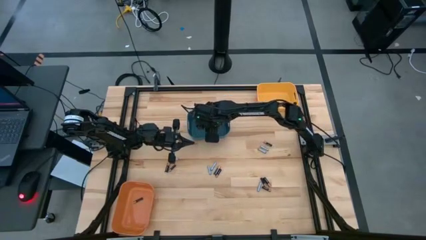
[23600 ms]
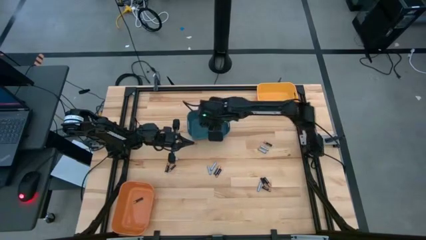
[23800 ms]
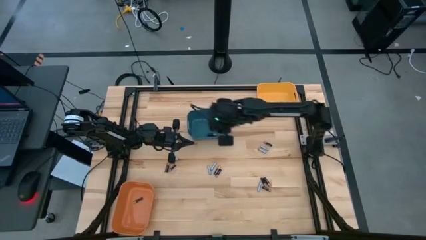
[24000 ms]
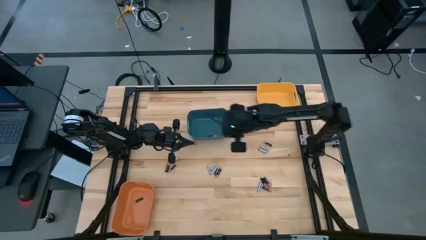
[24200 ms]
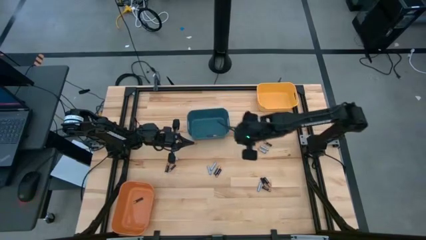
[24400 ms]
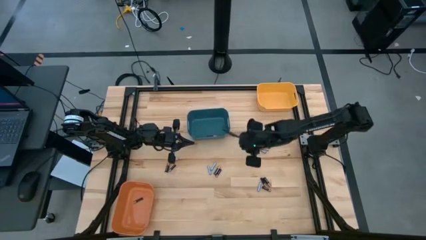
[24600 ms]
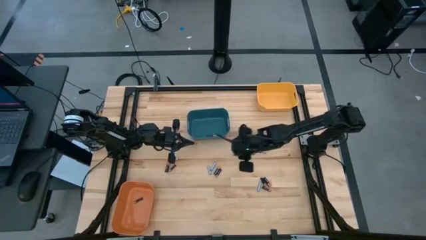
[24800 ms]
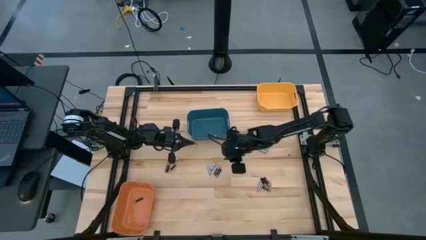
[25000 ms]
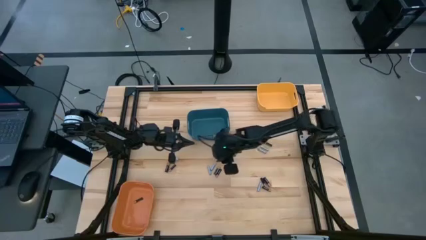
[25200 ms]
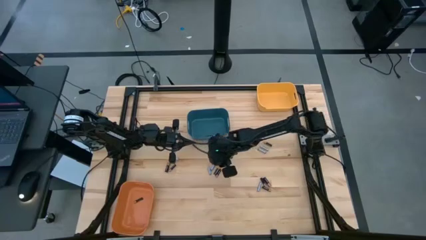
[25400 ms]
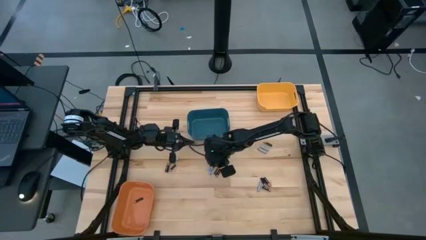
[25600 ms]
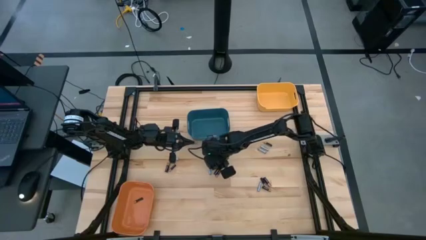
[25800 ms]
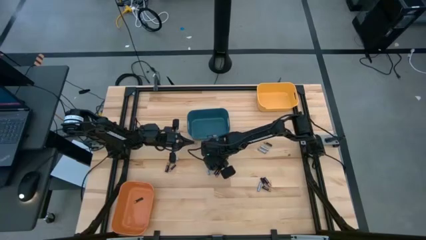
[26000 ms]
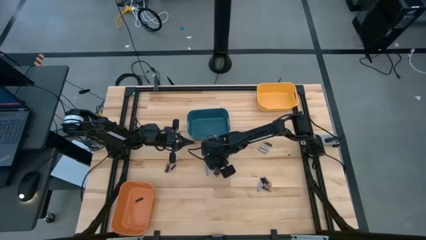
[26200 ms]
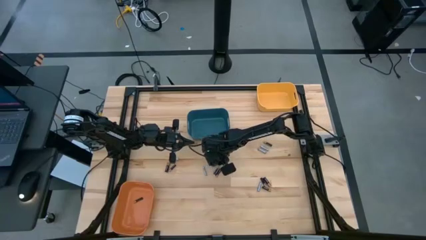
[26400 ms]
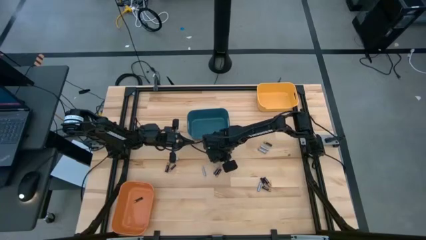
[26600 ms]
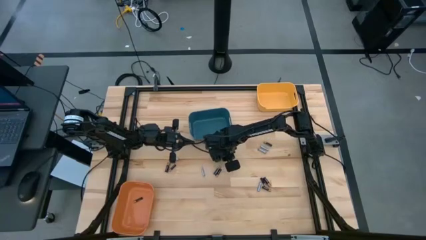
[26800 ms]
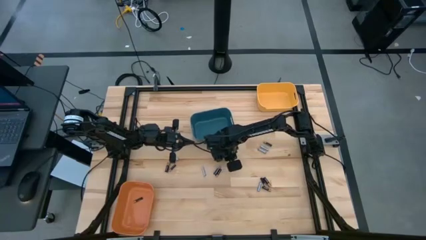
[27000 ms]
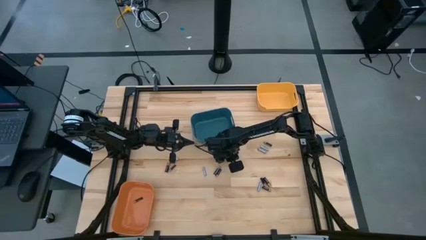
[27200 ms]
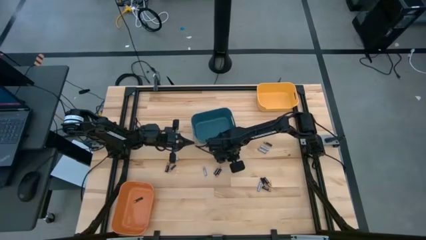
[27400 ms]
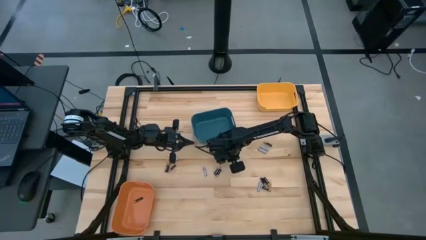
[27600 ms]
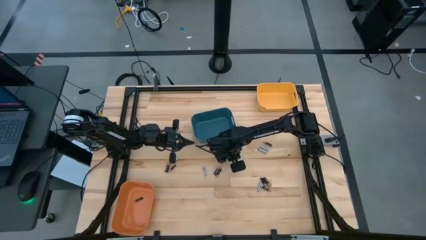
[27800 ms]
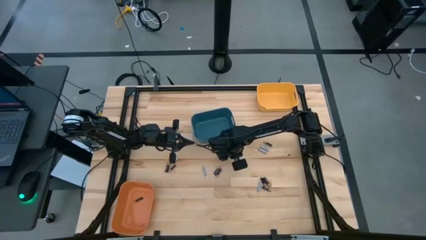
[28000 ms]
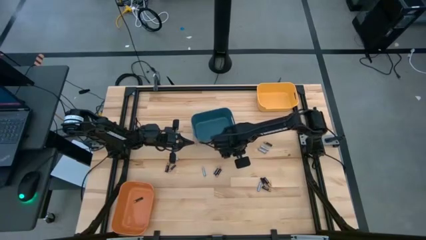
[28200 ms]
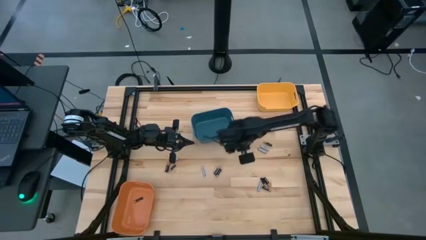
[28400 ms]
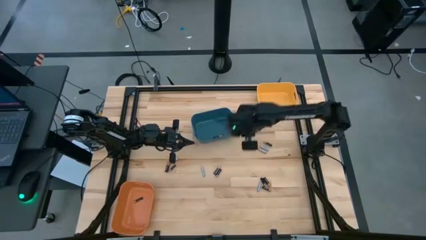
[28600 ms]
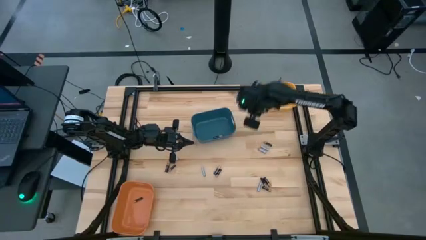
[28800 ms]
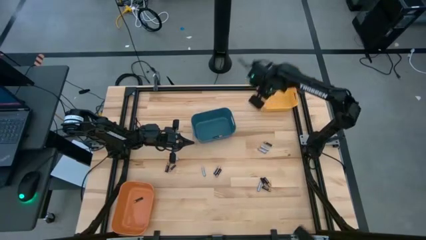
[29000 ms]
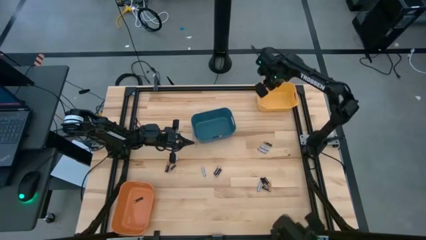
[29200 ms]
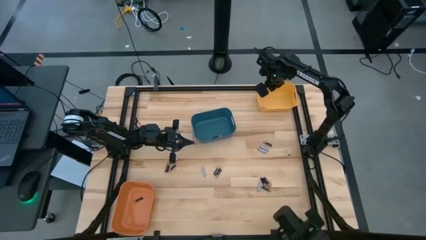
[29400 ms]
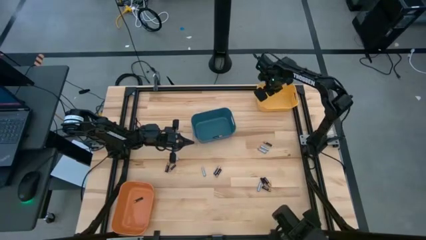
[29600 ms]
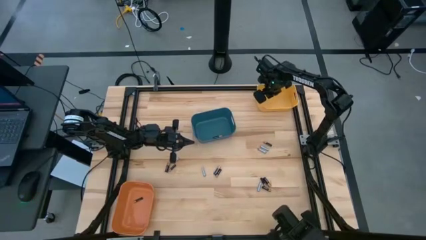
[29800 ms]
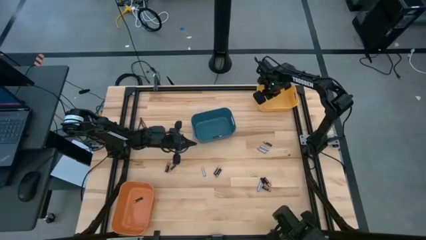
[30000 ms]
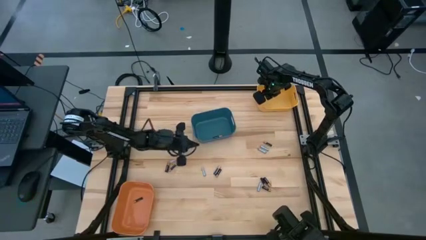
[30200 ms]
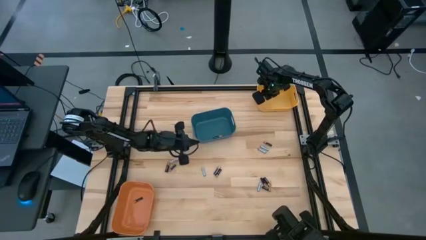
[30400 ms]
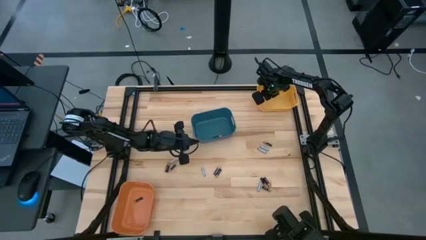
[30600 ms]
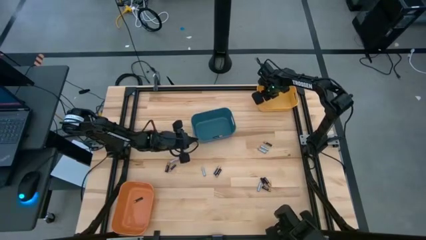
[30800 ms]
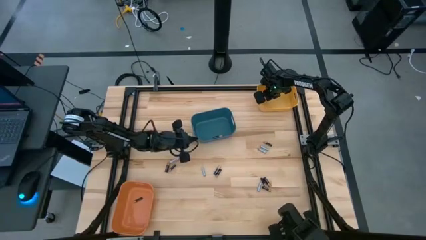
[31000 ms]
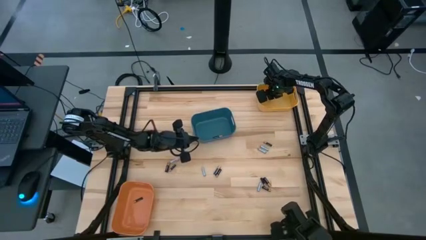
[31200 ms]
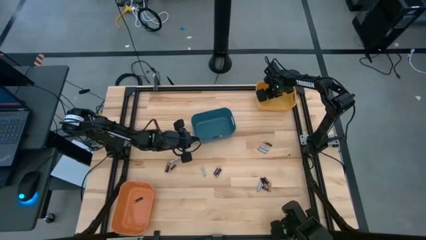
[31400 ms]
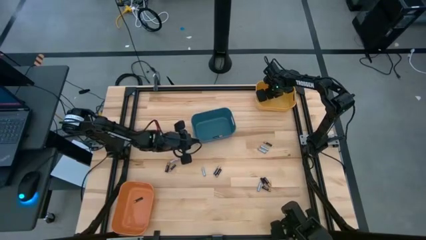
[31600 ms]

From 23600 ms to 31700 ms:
Task: Sort batteries
Put the white battery into the yellow bin

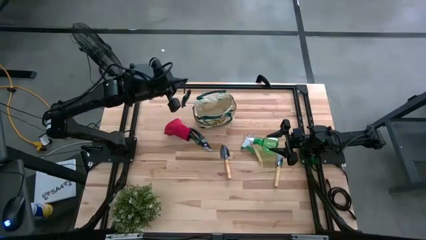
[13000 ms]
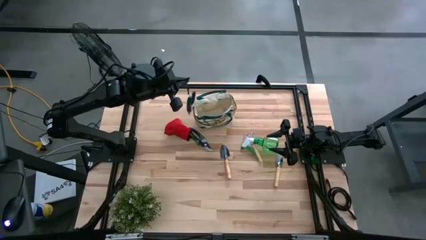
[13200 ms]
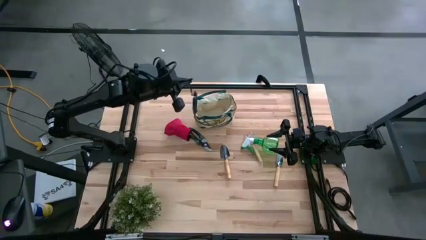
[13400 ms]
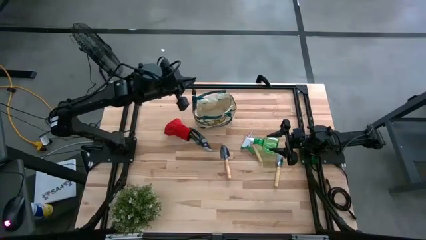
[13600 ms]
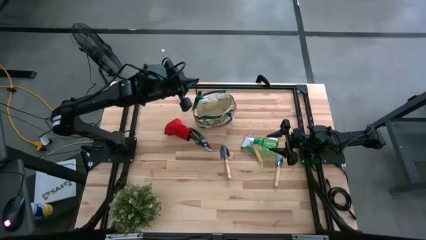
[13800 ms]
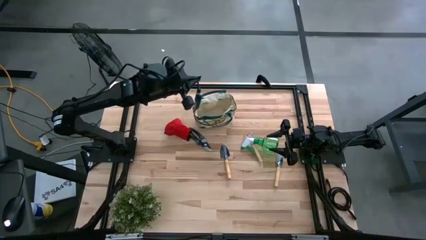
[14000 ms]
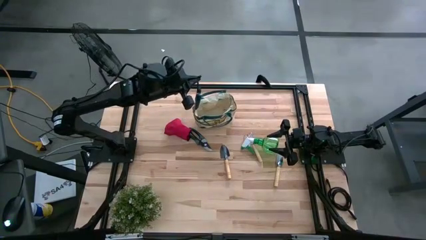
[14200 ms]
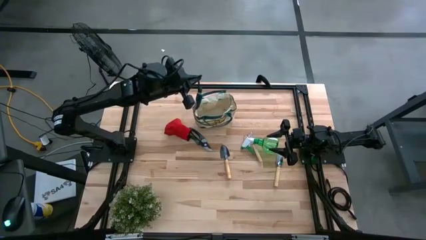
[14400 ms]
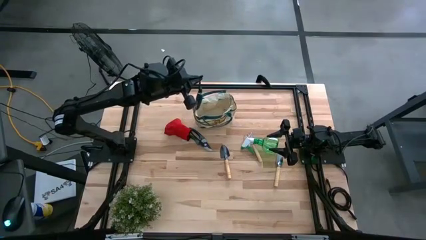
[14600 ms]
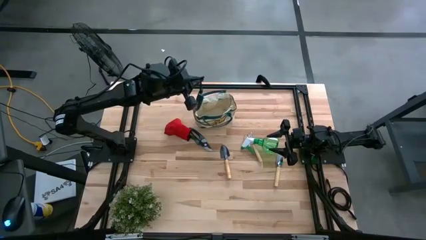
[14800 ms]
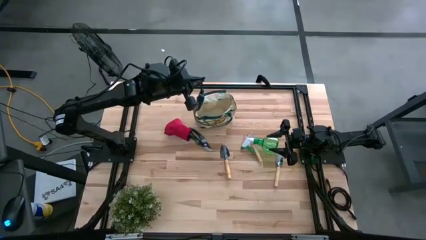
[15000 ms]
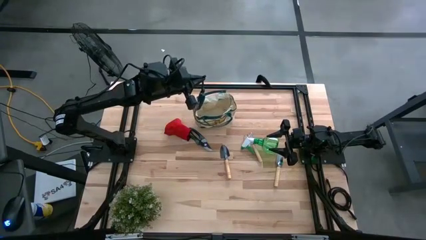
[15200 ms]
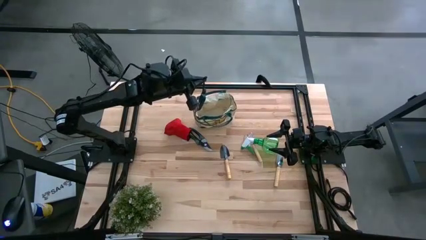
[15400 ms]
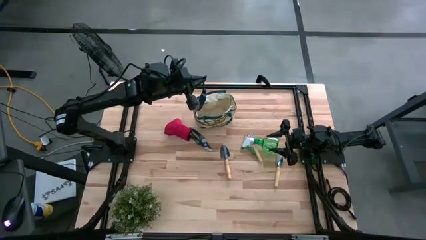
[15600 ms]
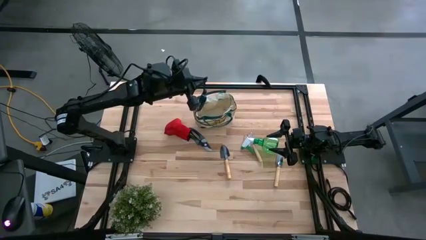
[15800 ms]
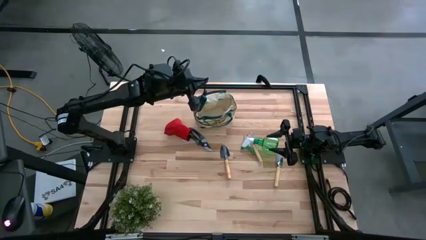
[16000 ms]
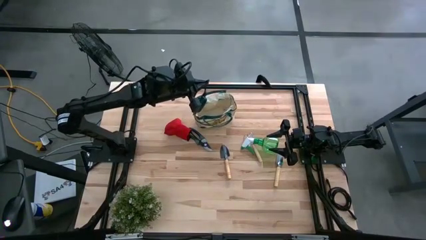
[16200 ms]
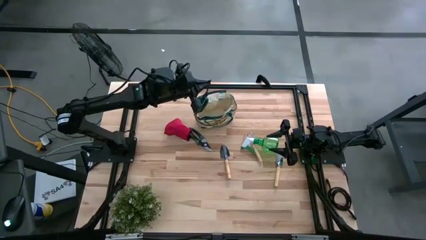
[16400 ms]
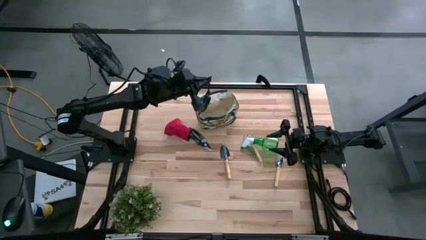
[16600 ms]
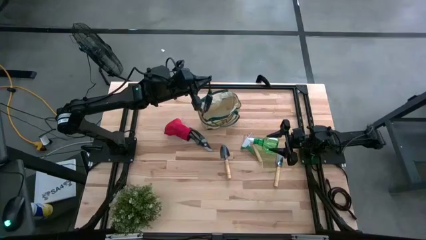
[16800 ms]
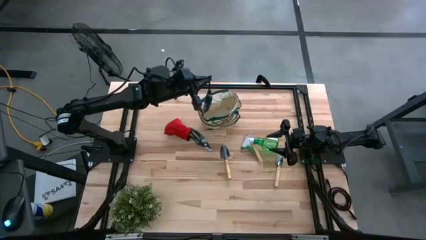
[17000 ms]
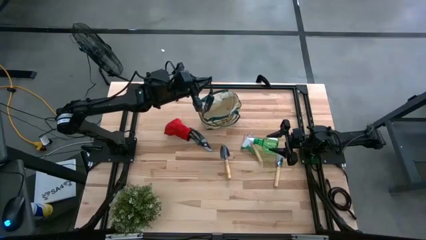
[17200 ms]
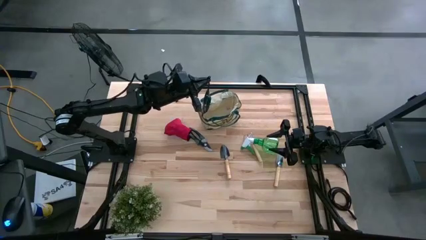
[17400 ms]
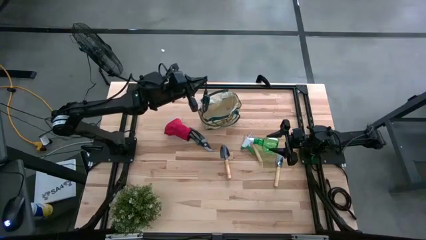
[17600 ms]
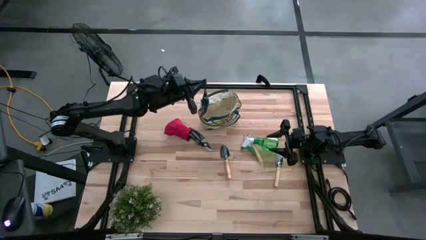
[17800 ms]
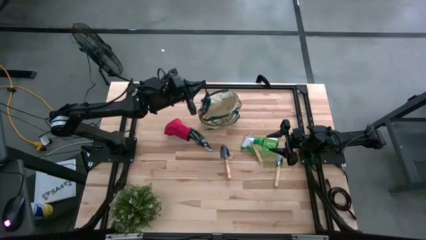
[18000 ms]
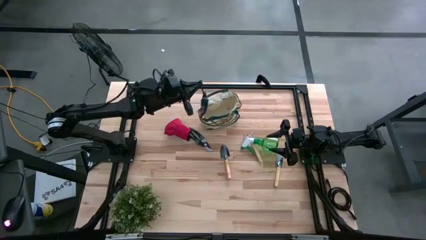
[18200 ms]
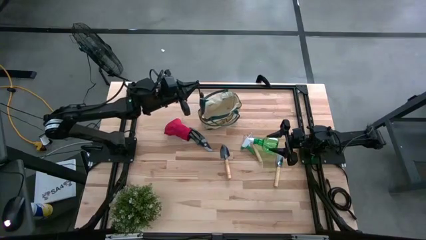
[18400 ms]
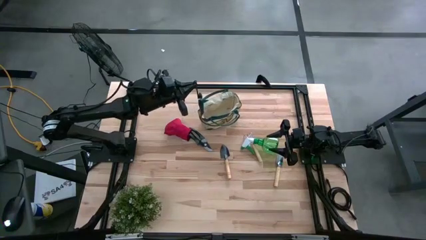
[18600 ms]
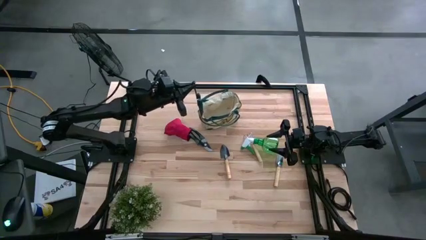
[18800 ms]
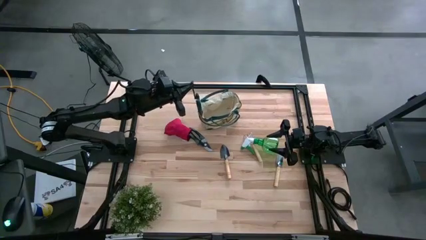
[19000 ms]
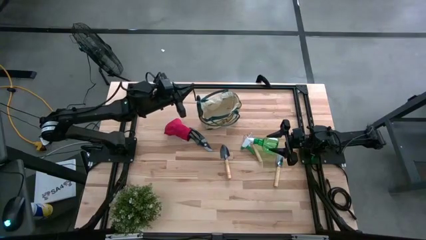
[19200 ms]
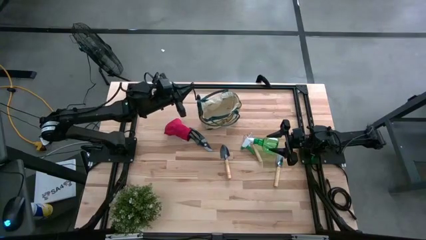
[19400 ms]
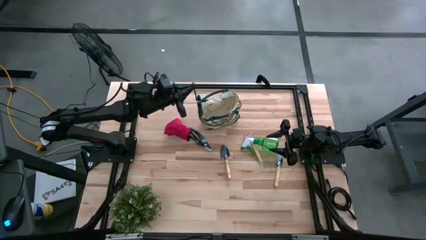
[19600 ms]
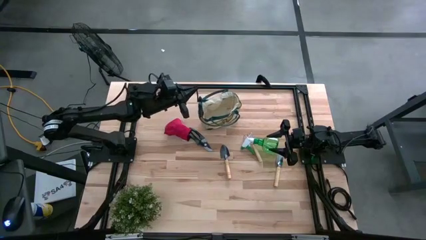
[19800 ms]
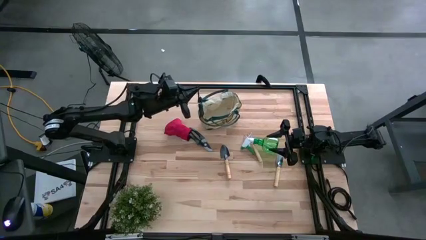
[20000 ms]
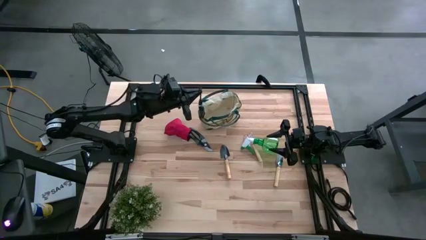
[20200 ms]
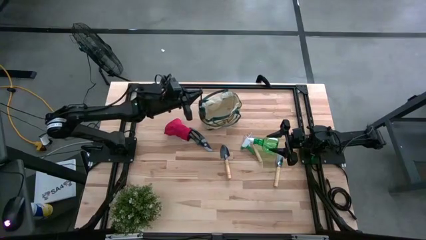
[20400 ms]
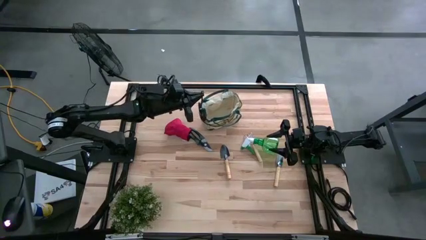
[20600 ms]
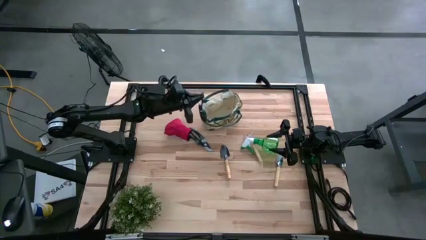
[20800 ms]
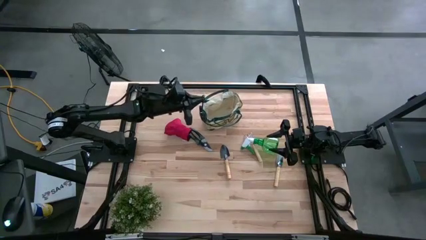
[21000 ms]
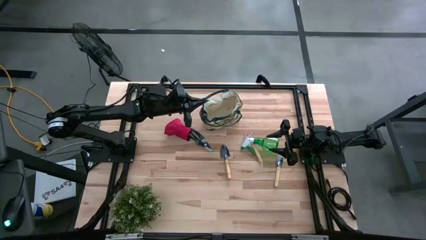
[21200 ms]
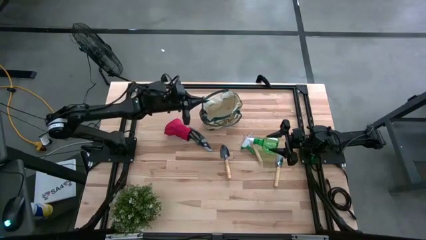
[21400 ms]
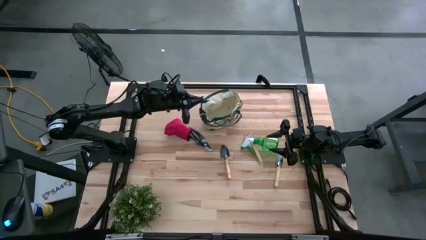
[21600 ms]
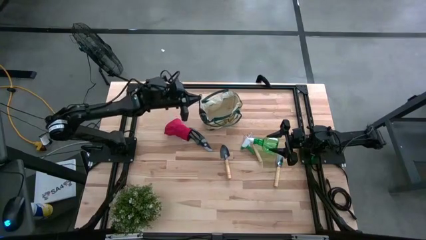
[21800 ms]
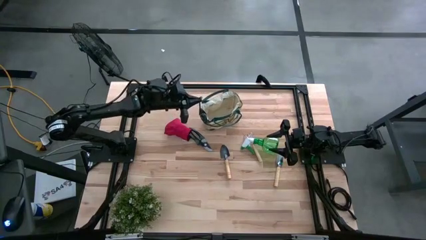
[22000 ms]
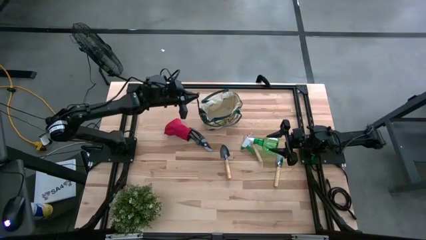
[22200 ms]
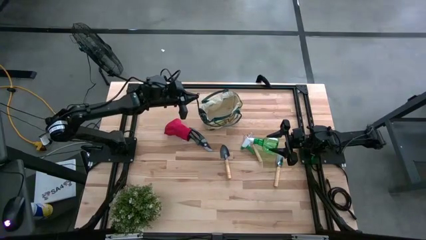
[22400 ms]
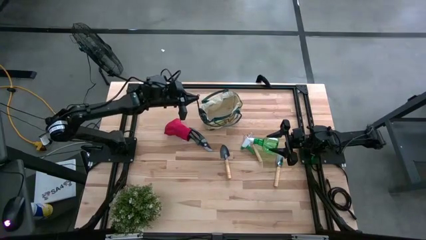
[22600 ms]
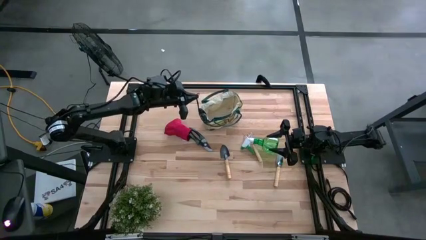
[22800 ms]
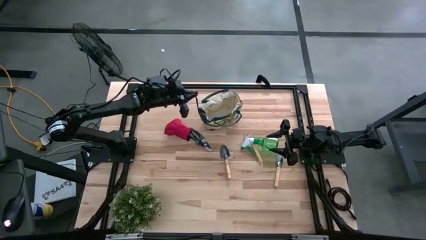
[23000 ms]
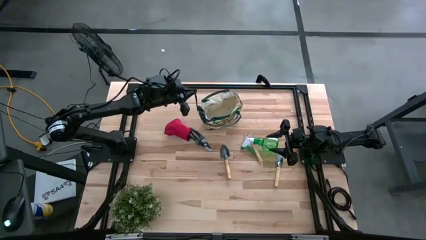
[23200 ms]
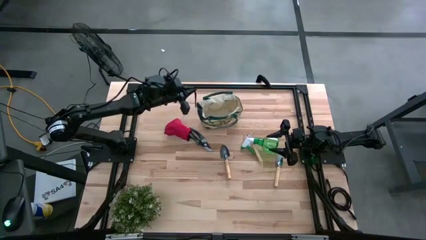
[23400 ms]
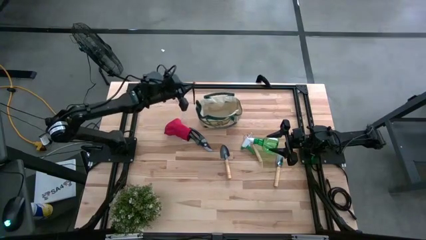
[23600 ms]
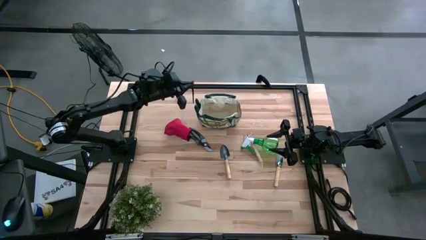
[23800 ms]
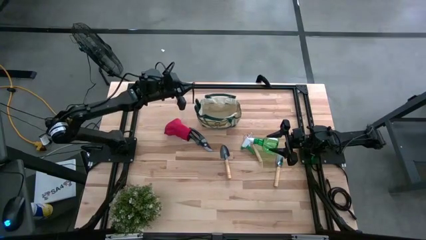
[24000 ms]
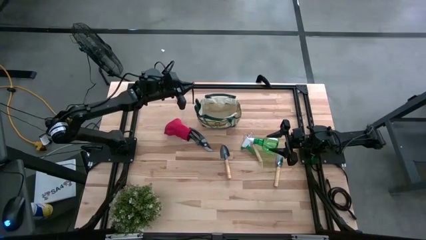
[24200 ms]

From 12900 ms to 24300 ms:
Task: Pick & Place Garden tools in Gardening bag
Put the left green shear scissors into the gardening bag
